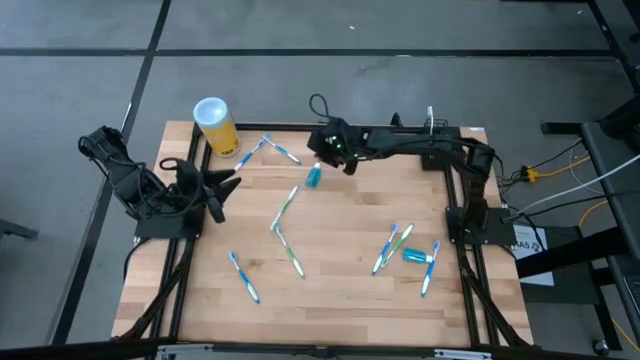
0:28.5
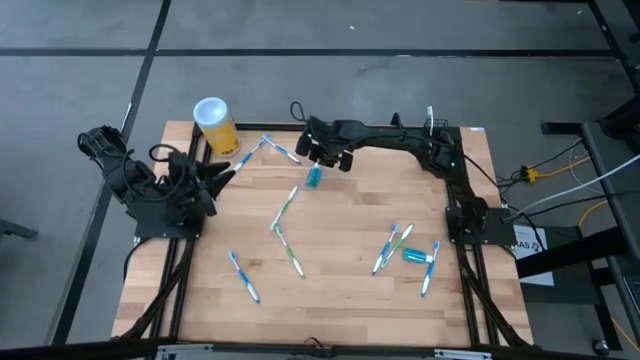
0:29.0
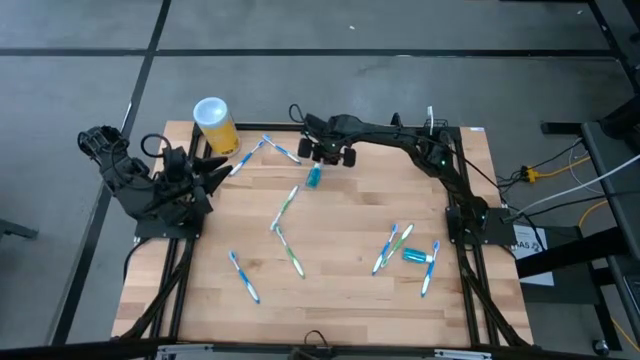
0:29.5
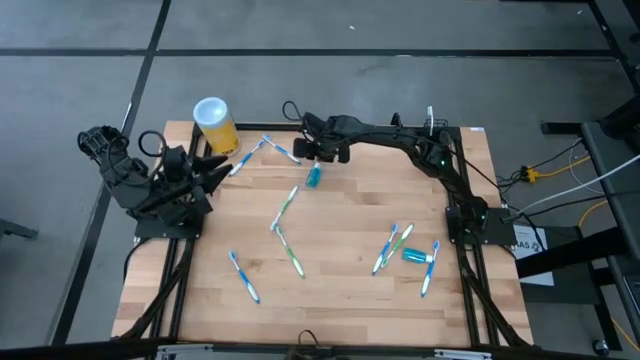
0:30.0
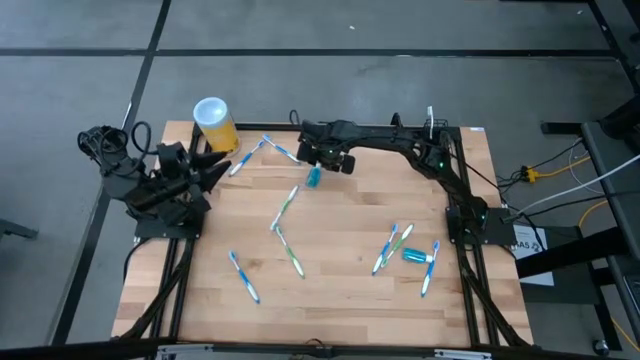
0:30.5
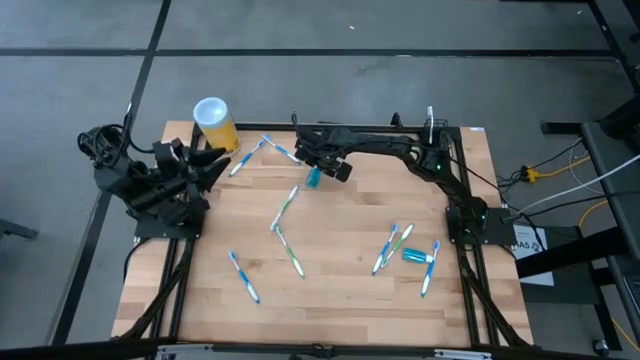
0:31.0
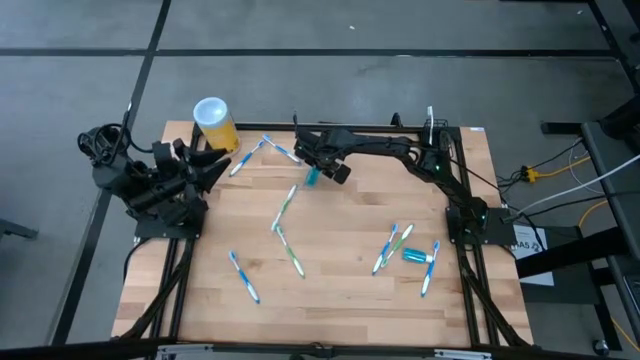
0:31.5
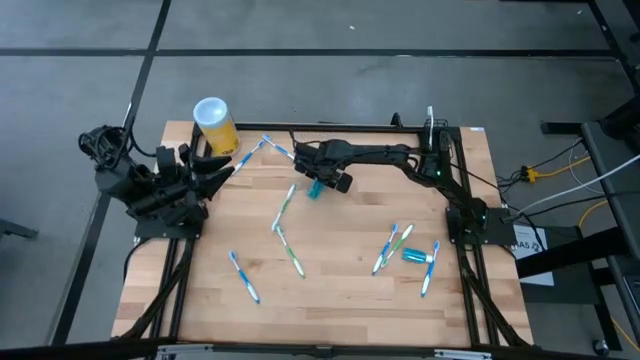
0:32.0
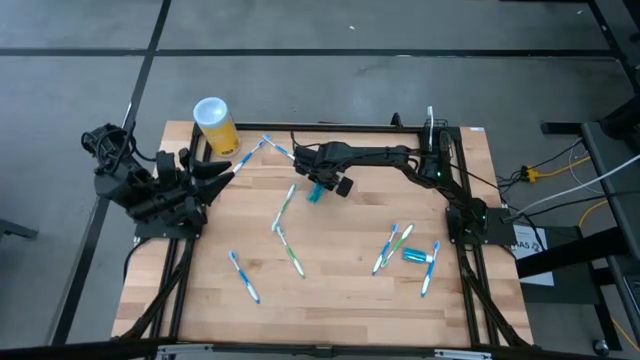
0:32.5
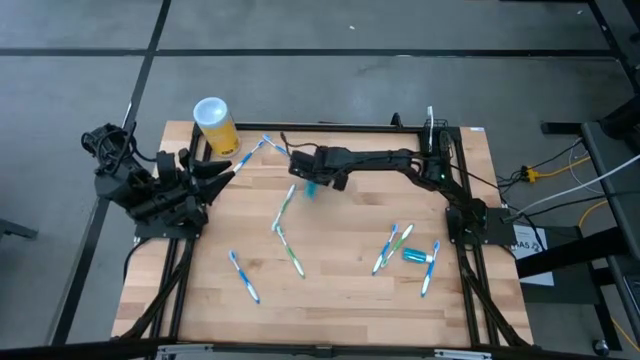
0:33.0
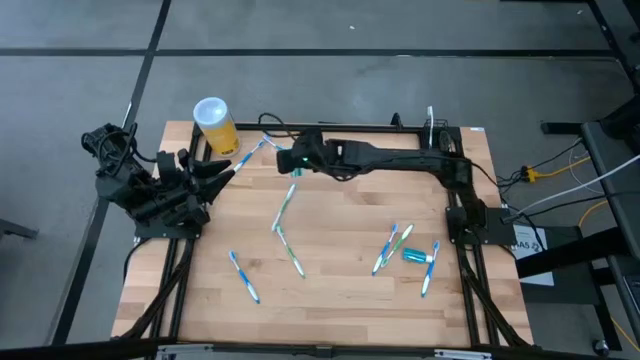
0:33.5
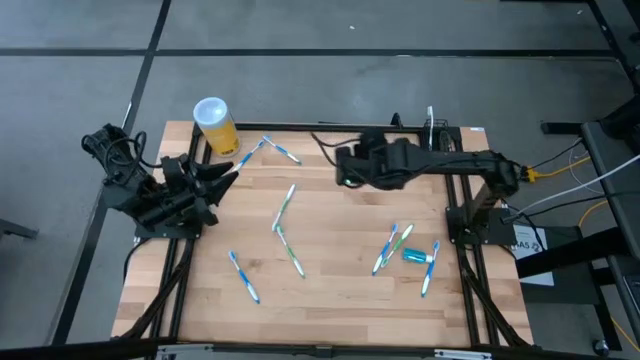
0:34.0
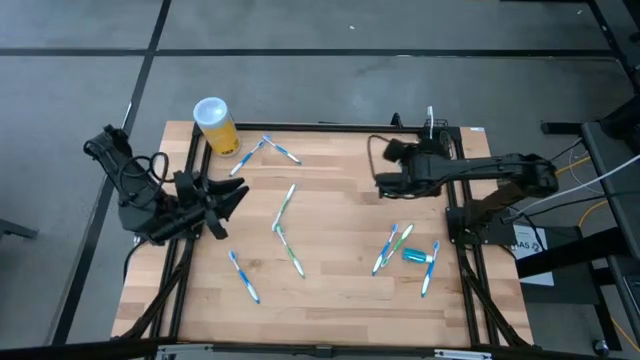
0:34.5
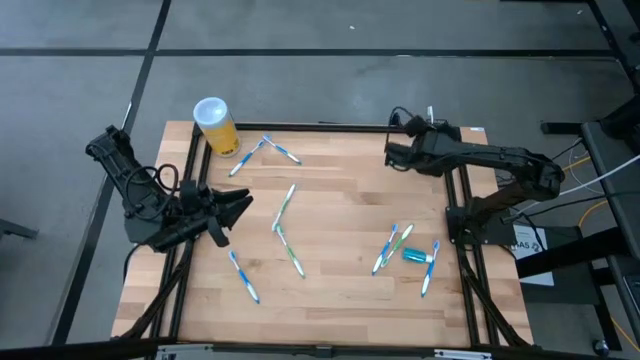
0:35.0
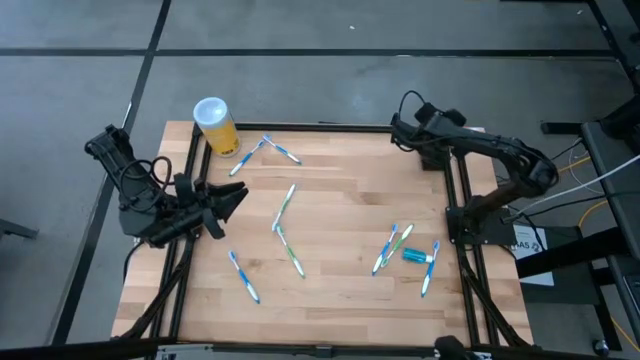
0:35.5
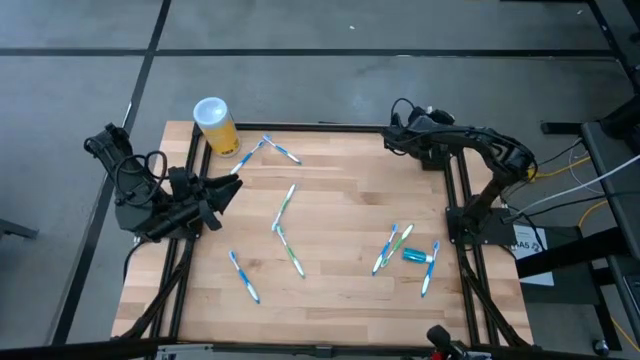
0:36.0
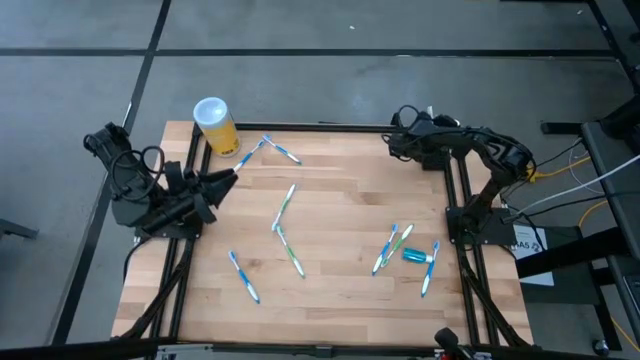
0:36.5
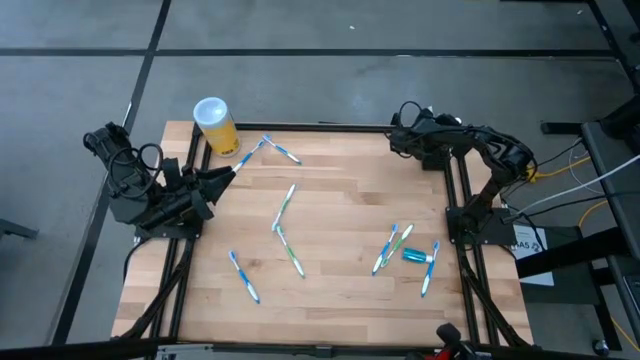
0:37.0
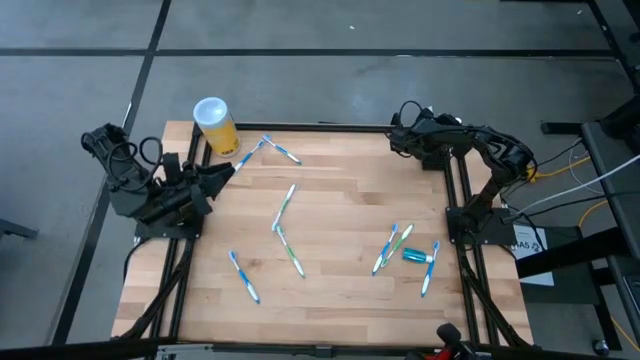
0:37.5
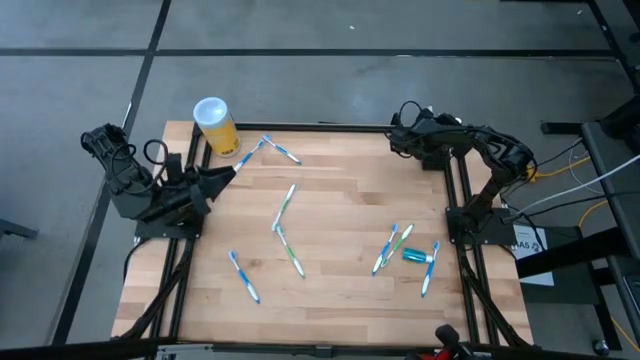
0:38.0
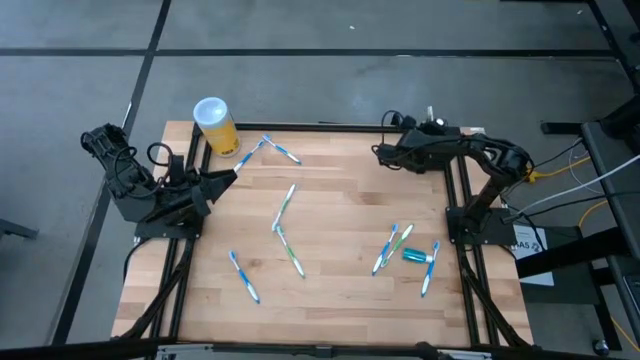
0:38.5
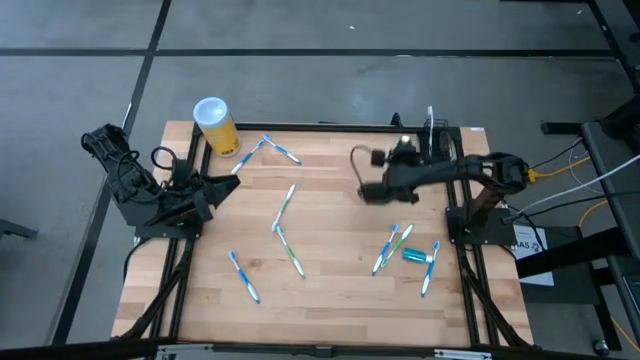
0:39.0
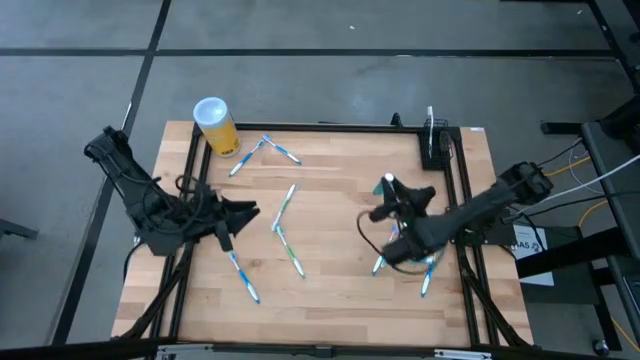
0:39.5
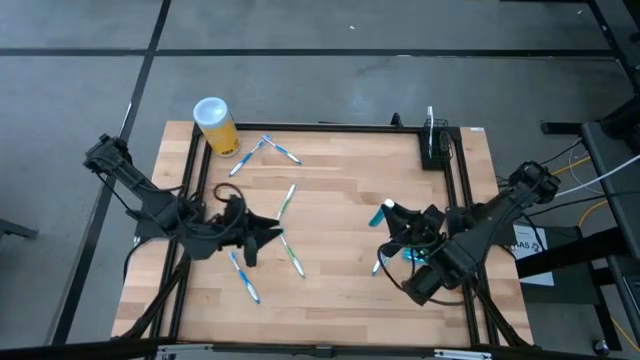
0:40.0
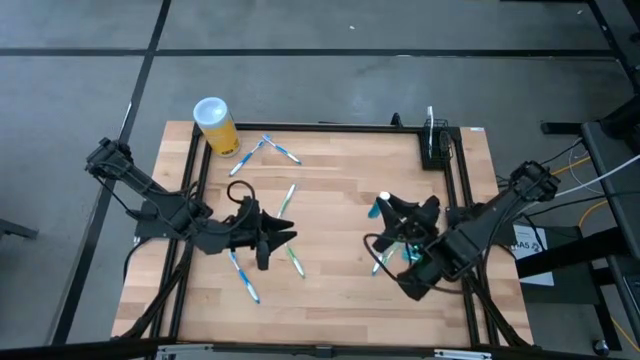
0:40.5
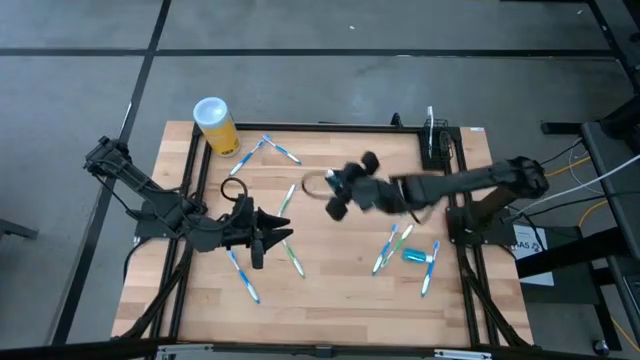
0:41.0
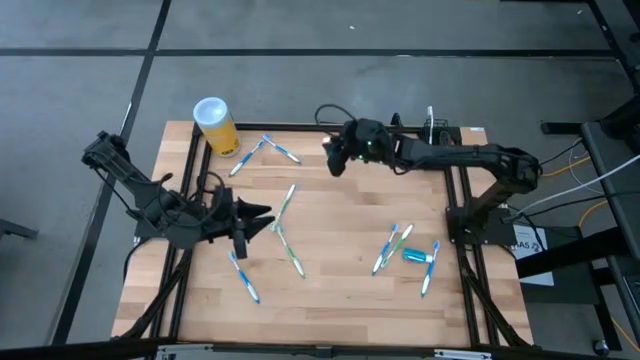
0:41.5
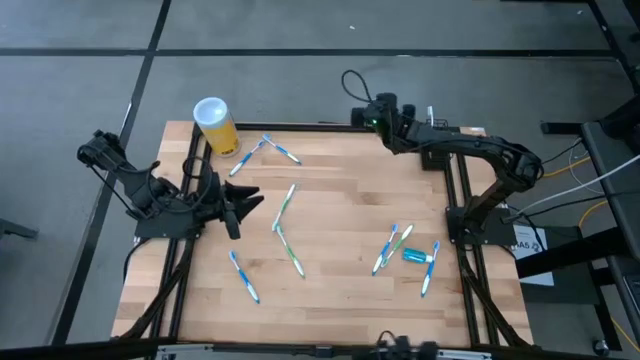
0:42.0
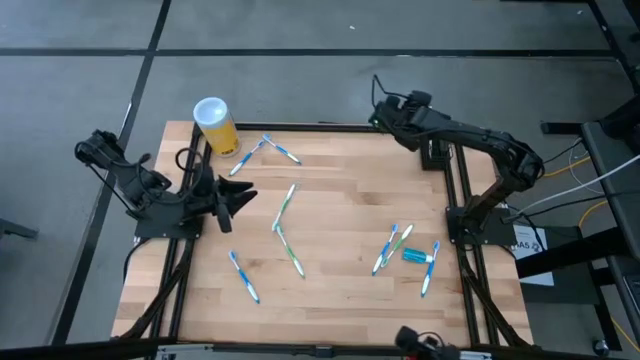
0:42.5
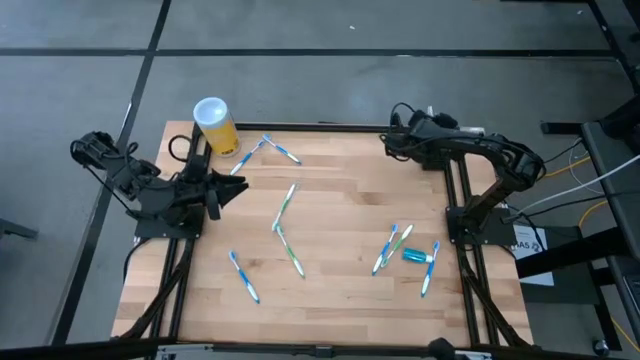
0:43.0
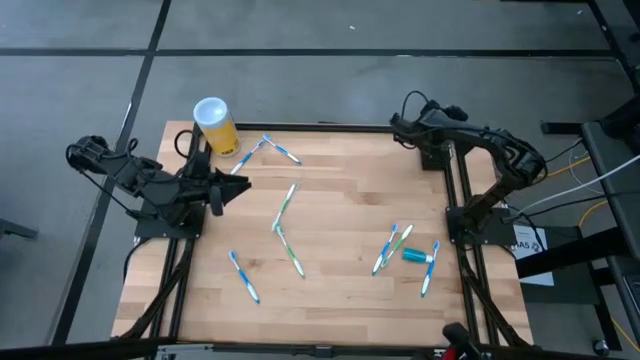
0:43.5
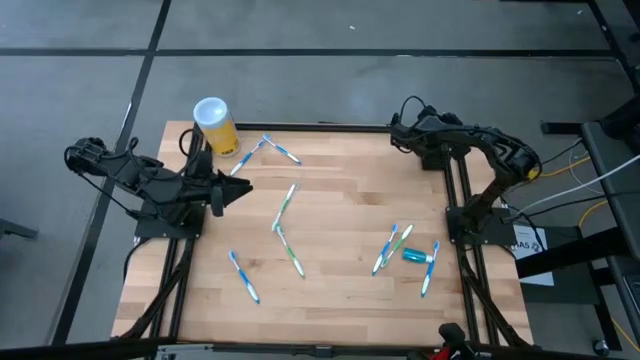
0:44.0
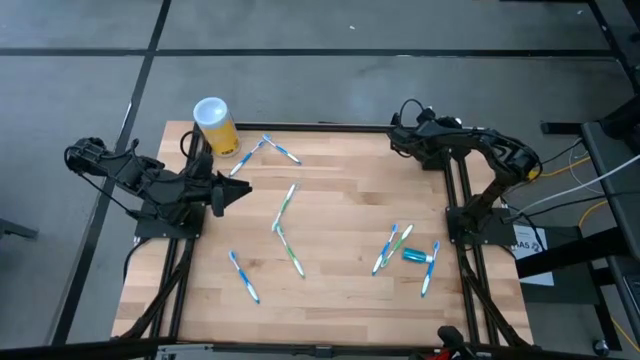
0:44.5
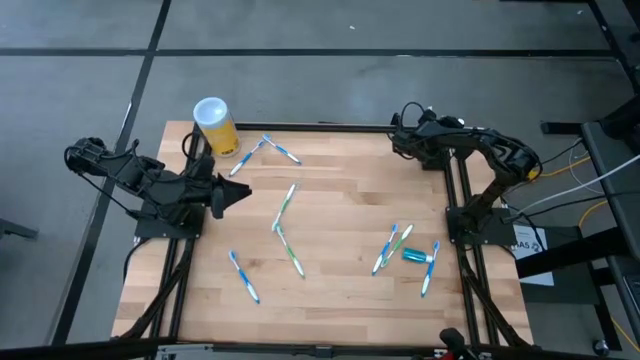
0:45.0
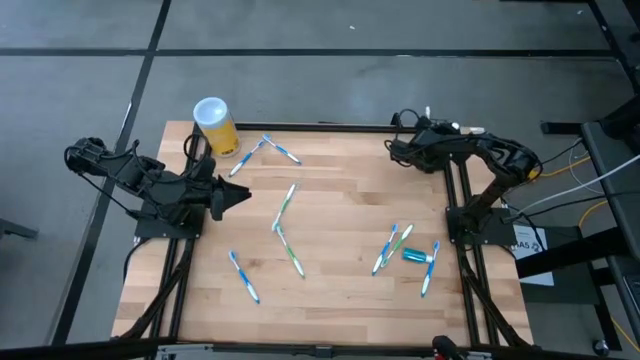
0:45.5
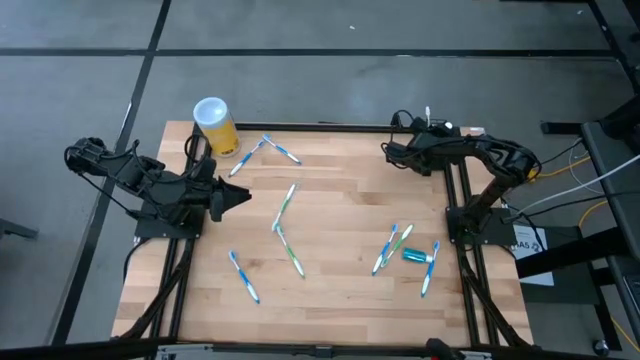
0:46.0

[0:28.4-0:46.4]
Task: Pick & Place toothbrushing station
Put the blue mouthwash into the mesh organizer

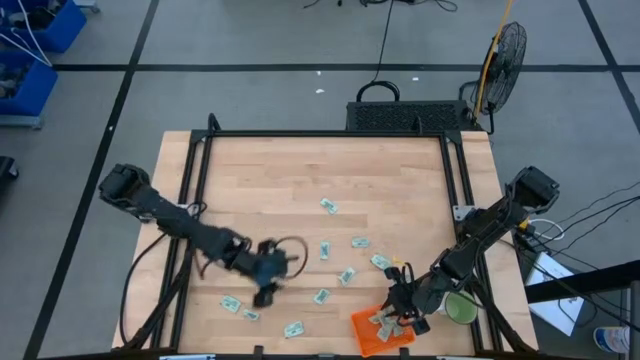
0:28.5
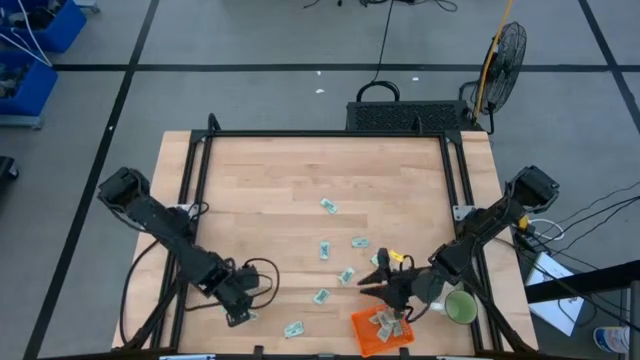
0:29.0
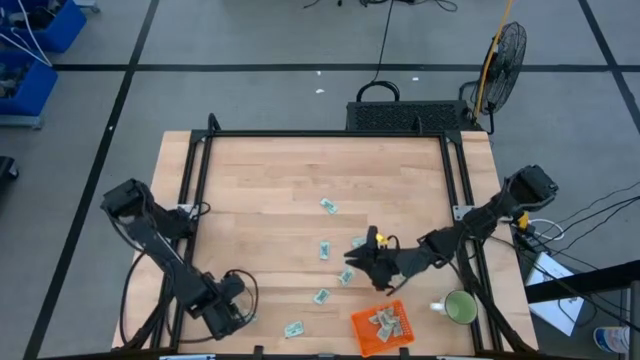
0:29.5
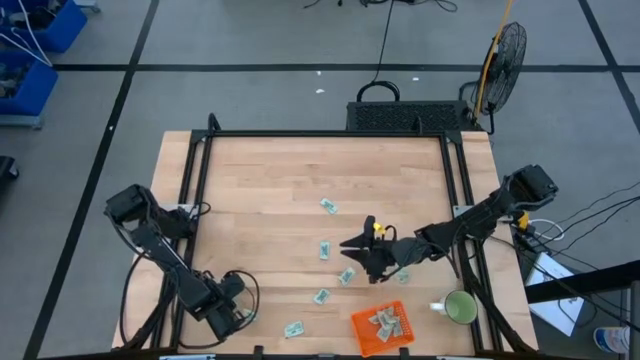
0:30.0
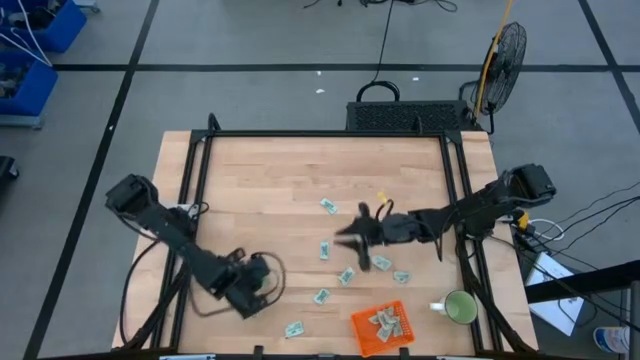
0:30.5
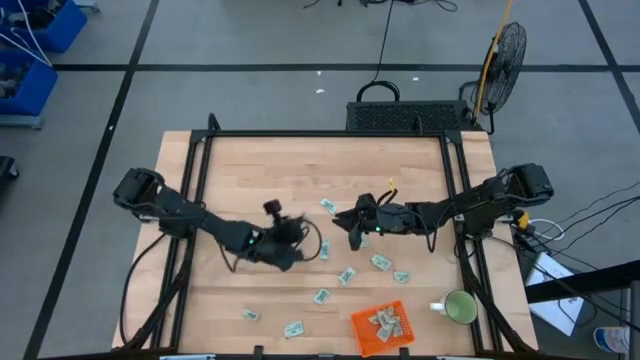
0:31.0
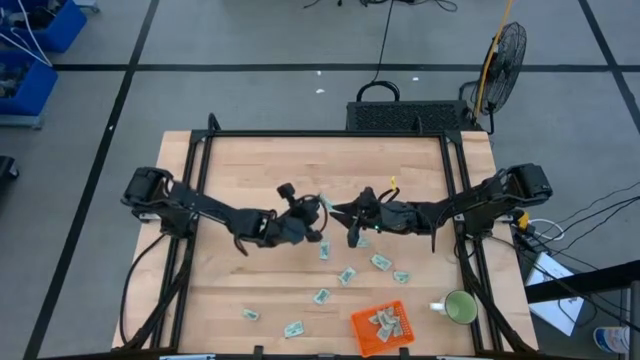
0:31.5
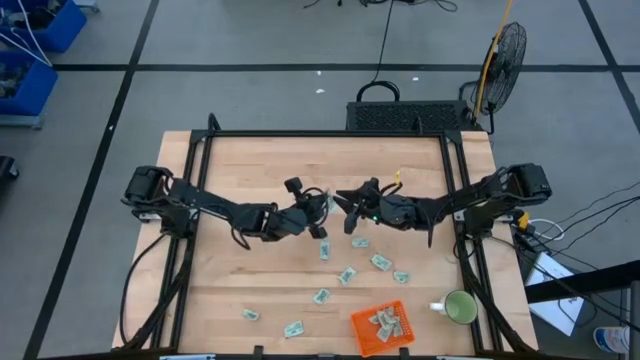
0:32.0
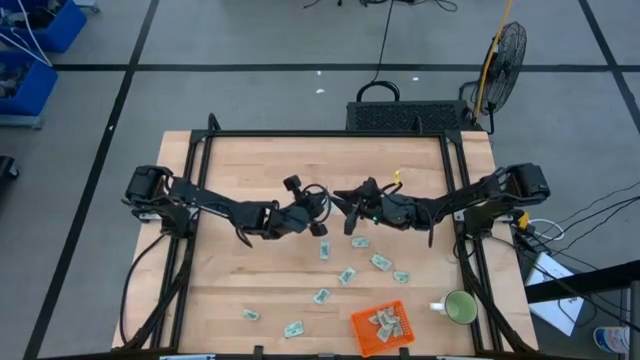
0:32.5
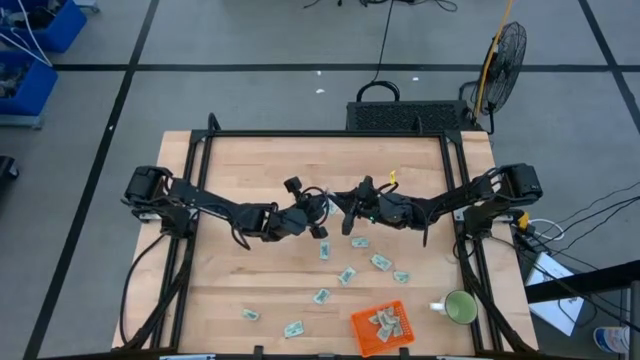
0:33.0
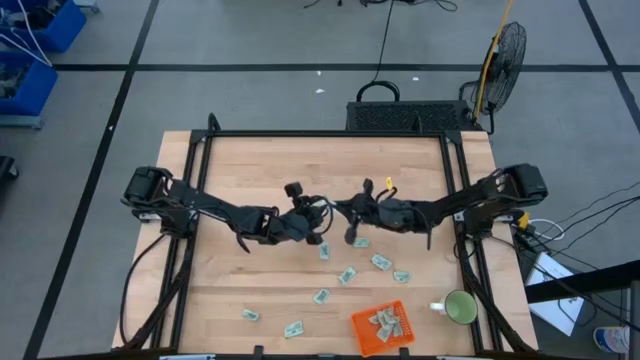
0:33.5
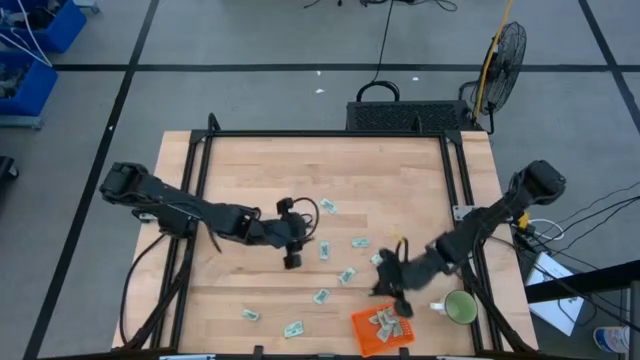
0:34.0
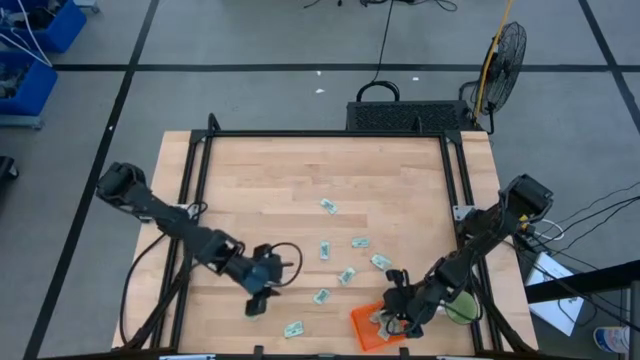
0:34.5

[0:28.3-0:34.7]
Task: Pick and place Stevia / Truvia into bins
Put the stevia packet into the orange bin
